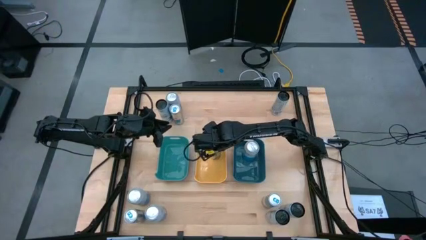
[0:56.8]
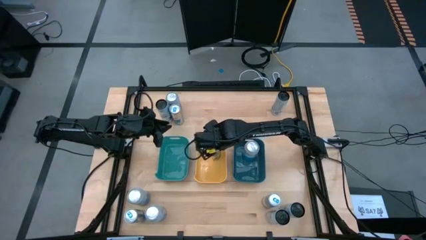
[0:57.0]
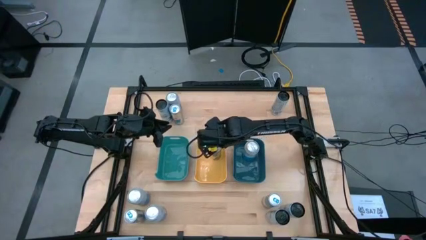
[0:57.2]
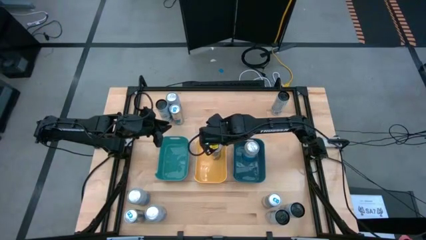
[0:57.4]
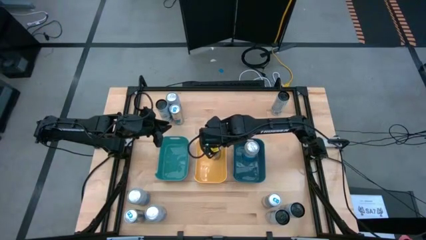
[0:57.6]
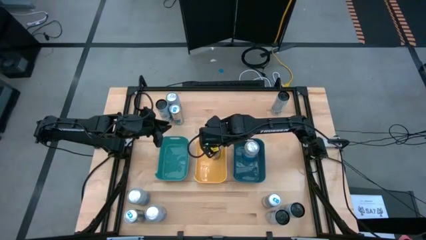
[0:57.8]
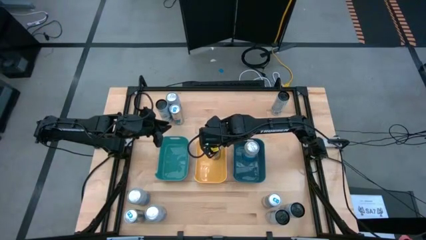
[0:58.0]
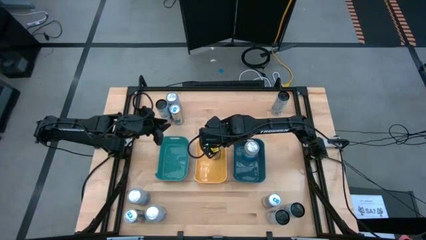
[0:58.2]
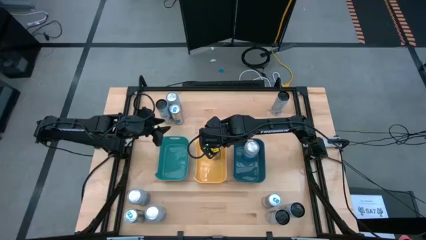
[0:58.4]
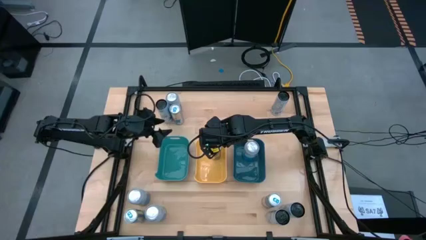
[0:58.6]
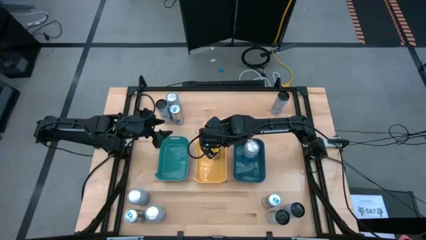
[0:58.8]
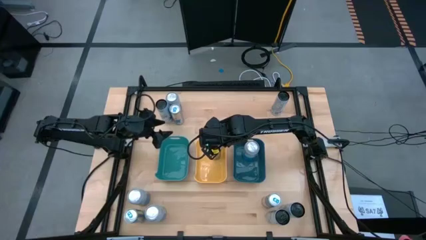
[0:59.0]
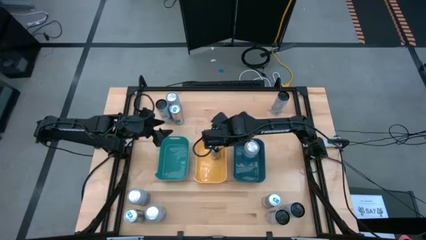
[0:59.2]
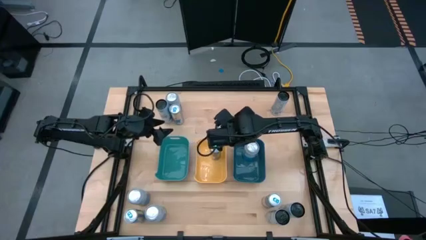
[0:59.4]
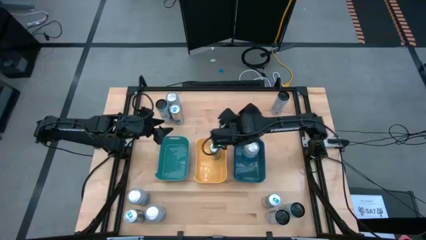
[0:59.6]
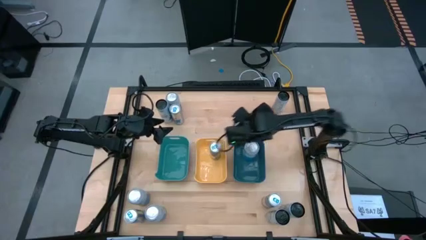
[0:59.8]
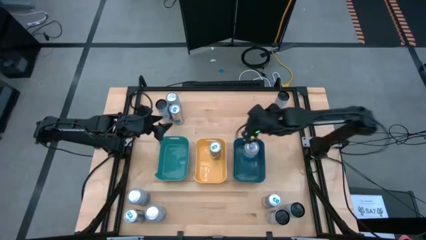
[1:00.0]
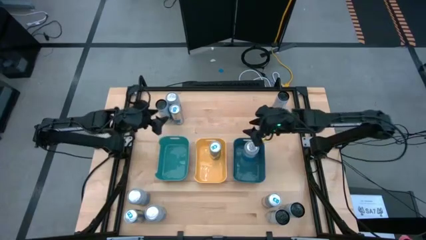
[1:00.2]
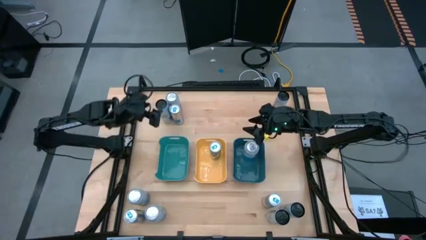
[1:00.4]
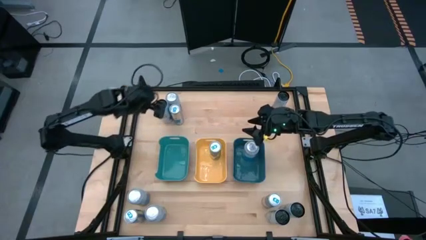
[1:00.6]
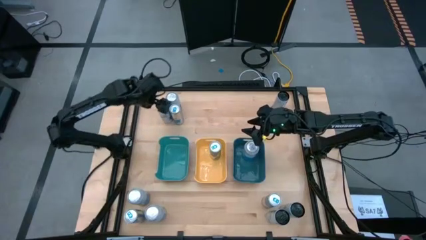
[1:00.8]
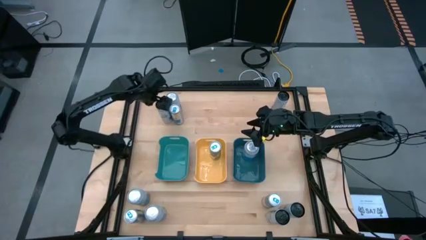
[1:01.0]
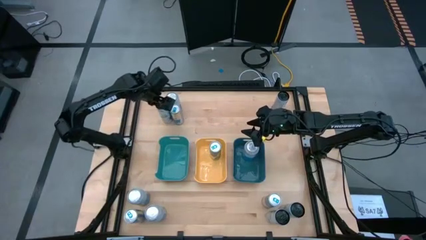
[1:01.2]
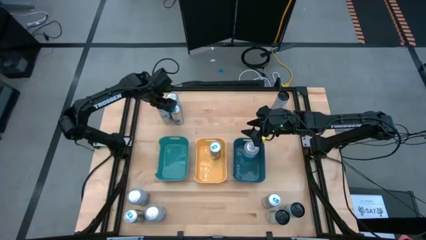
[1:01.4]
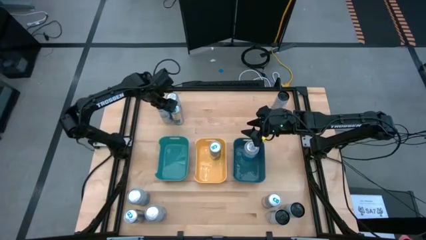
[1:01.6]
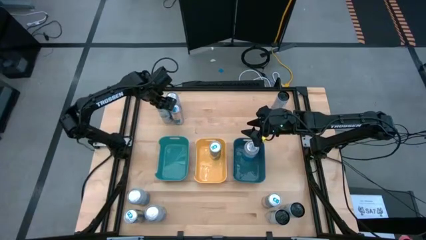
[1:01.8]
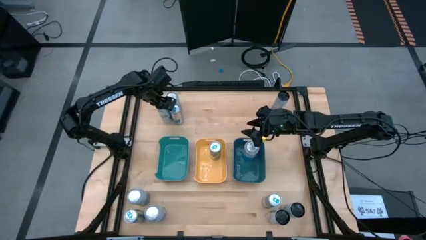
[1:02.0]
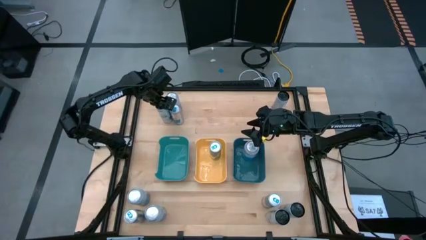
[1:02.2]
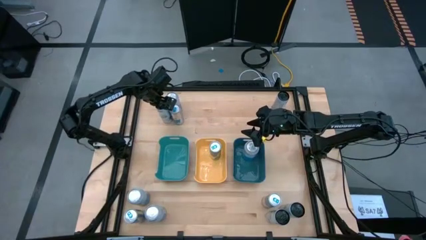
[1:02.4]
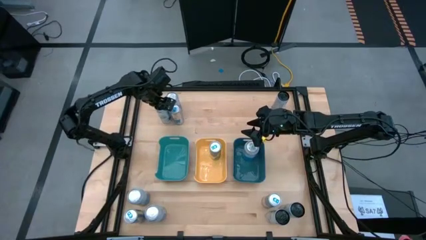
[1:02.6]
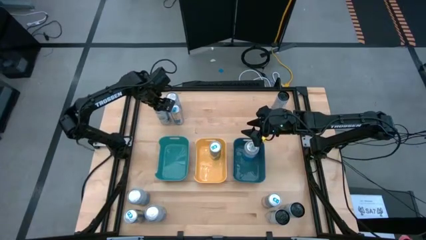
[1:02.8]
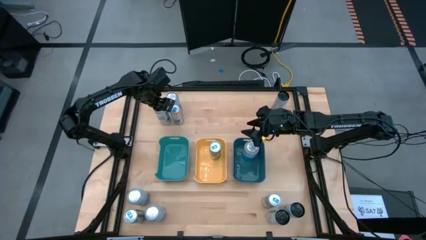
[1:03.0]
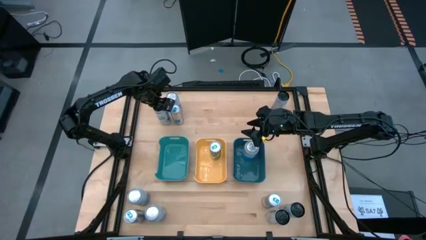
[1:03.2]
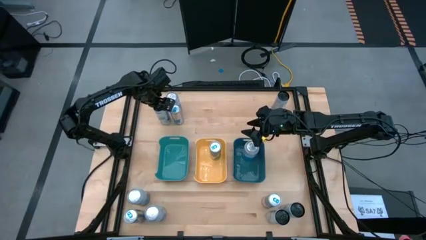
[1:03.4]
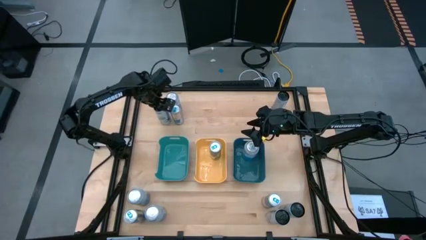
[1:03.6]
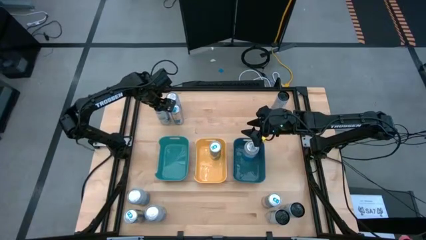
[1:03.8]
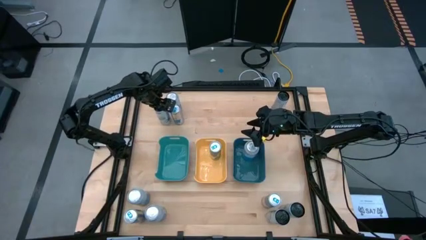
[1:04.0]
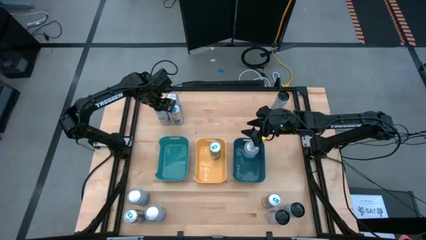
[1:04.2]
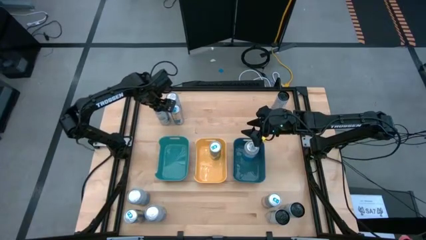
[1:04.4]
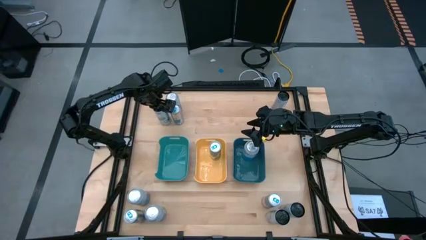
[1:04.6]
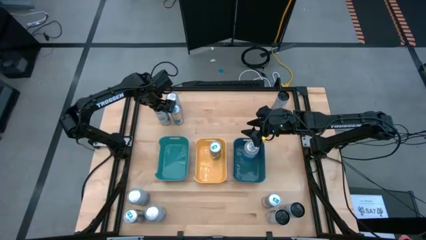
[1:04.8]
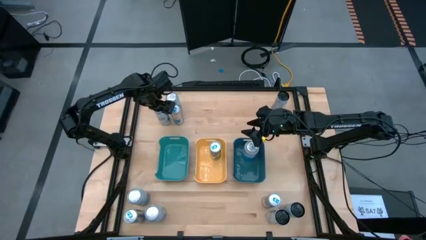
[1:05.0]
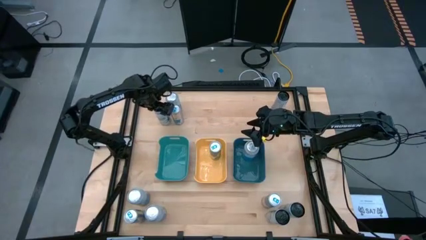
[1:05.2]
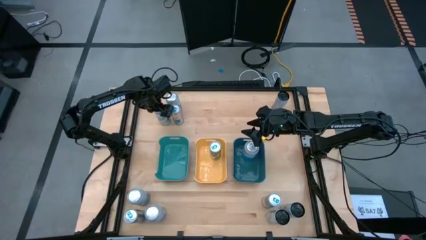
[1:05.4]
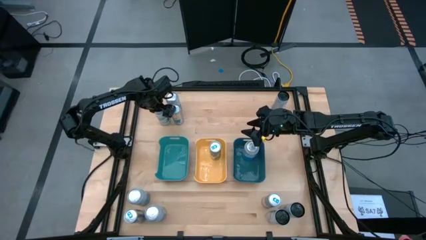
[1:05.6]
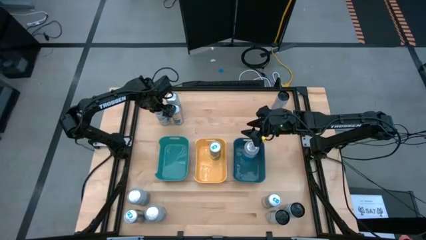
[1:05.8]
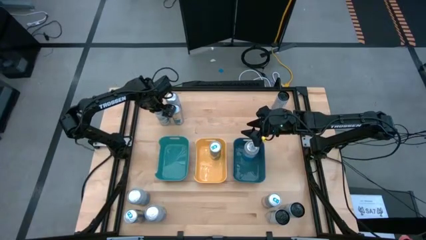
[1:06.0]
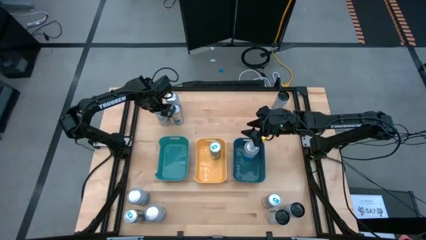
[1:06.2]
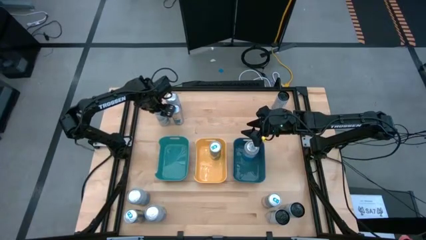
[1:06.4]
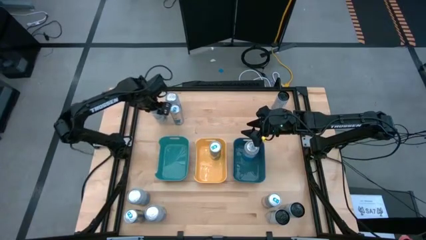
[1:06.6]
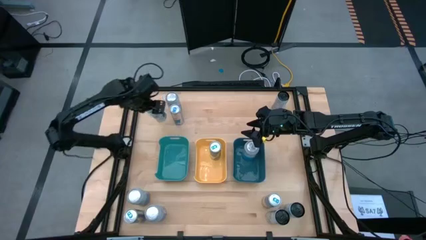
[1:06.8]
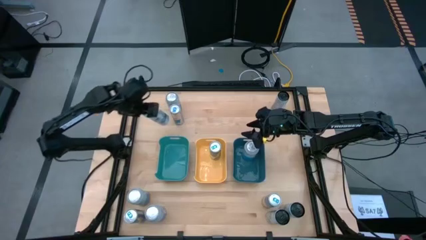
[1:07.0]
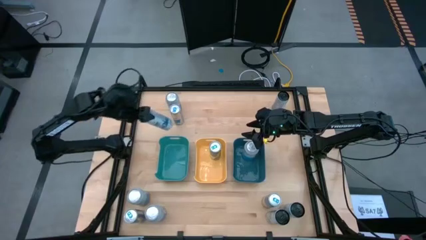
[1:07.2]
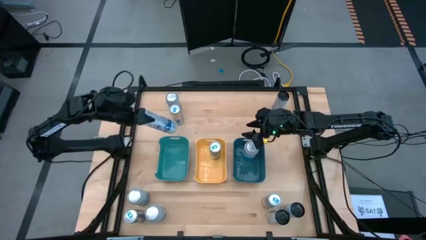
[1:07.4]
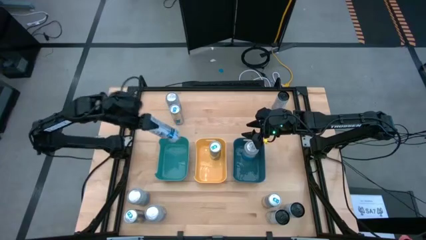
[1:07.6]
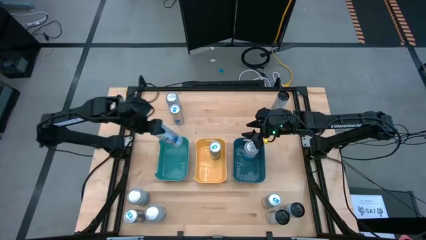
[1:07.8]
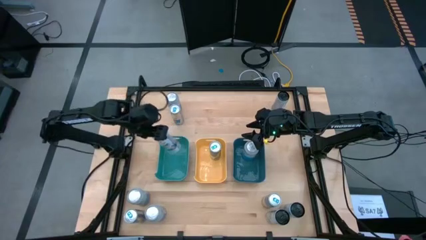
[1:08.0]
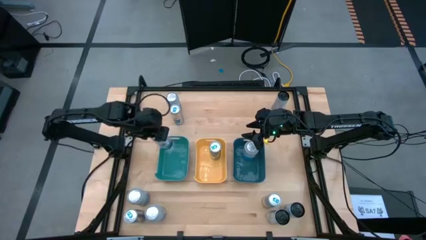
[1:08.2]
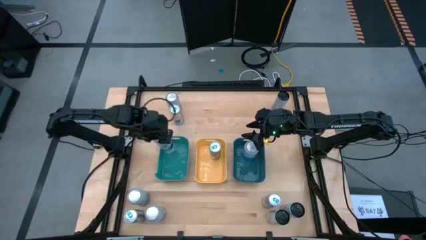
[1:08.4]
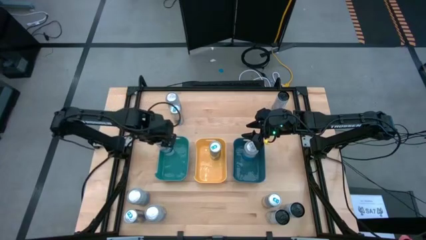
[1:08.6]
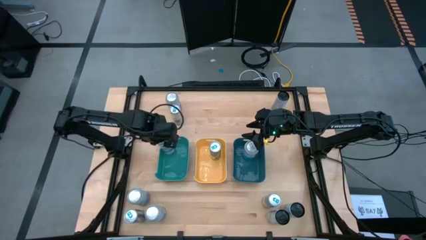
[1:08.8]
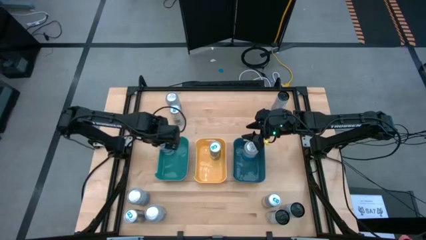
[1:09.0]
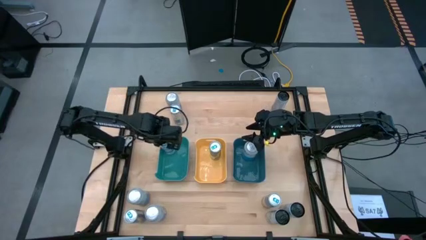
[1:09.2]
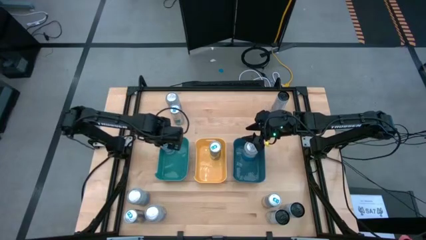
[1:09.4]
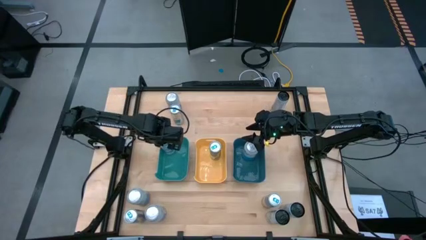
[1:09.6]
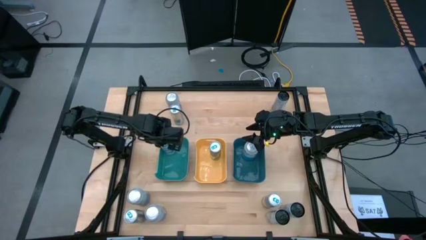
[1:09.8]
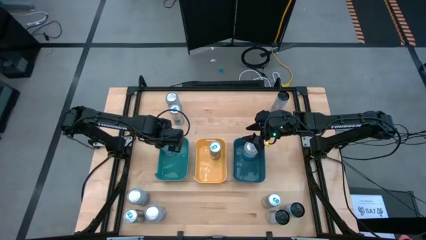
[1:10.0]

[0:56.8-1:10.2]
Task: Sort soda cans
Put the top left black can into the light green bin

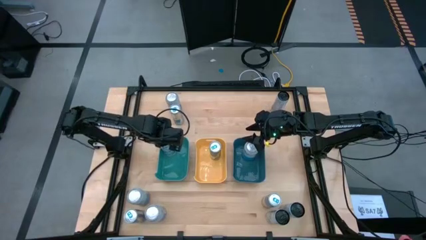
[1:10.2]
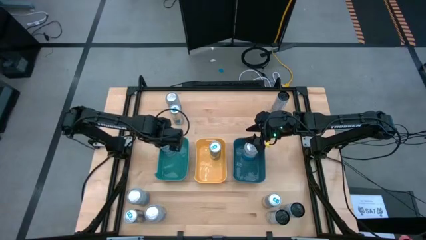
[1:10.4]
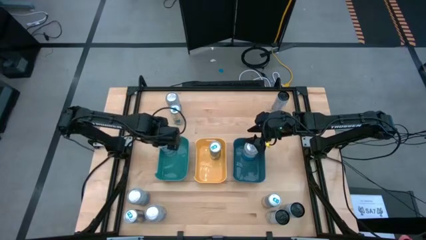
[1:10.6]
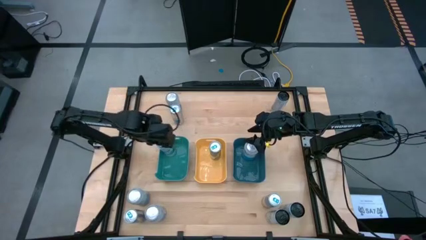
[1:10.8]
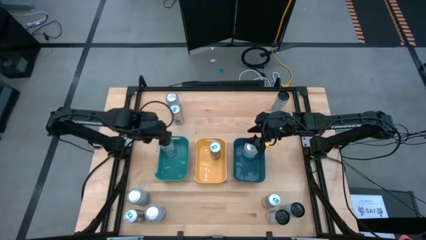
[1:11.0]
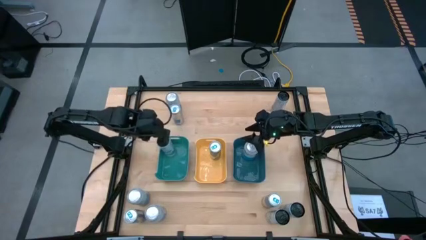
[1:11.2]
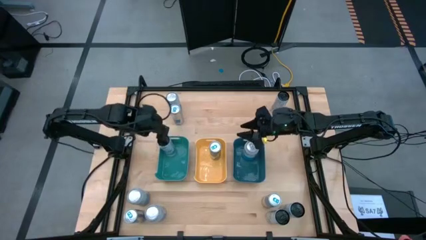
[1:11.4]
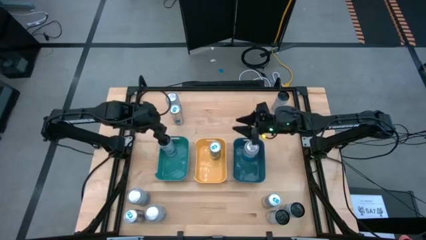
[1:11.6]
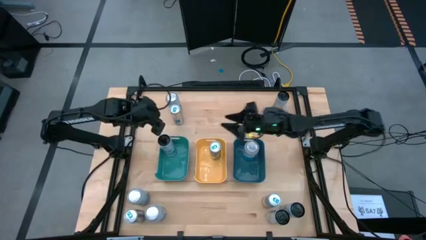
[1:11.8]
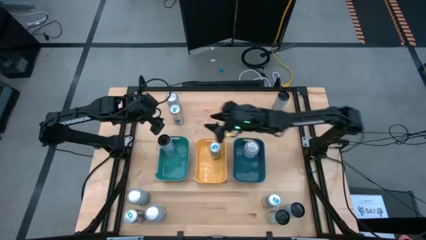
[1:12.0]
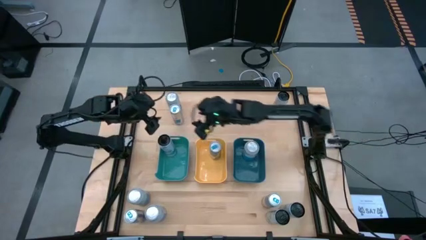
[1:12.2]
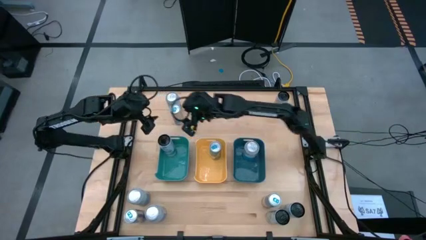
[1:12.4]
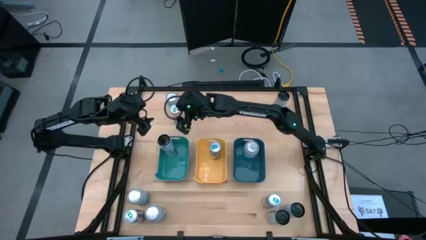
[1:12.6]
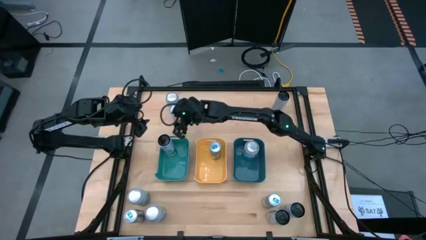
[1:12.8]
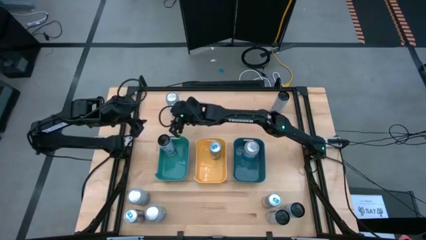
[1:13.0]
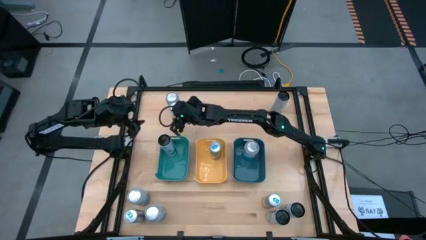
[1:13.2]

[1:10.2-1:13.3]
Put the top left blue can into the yellow bin
